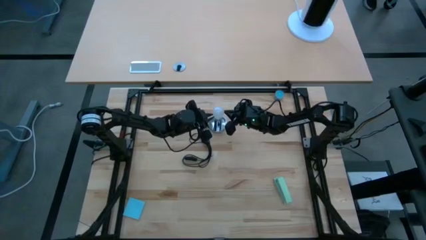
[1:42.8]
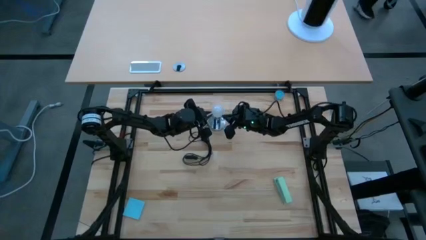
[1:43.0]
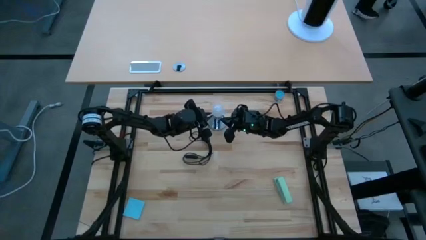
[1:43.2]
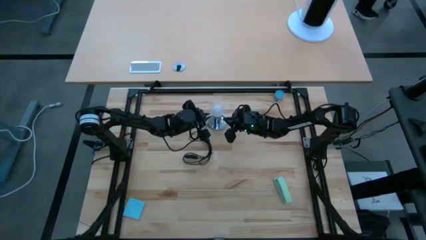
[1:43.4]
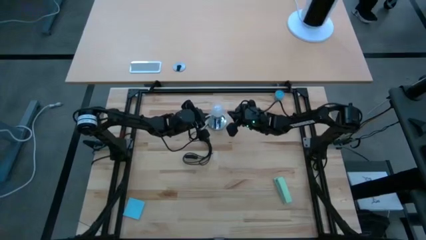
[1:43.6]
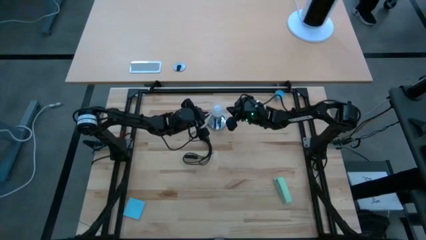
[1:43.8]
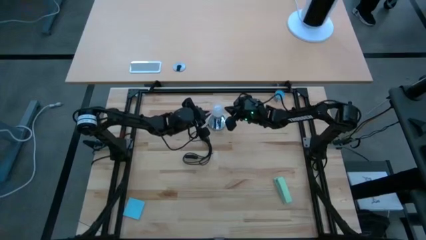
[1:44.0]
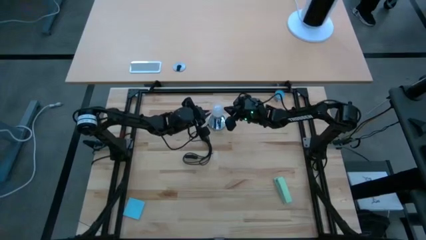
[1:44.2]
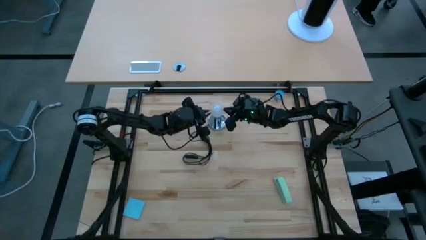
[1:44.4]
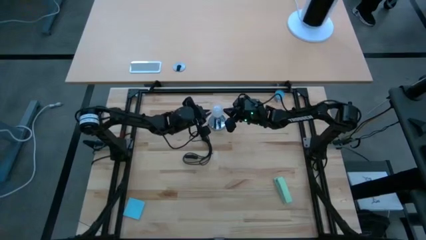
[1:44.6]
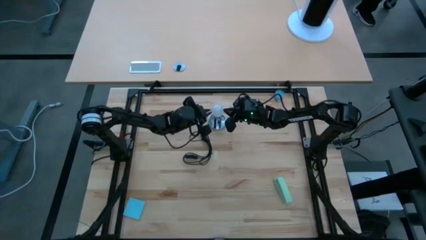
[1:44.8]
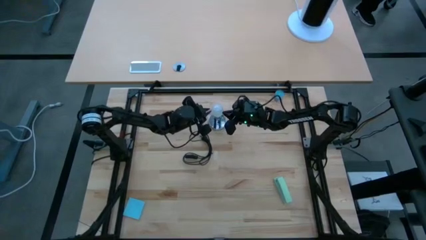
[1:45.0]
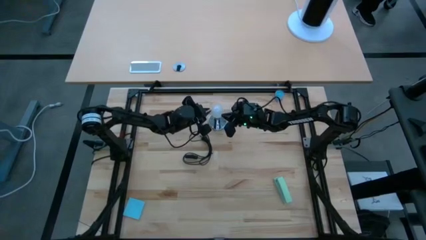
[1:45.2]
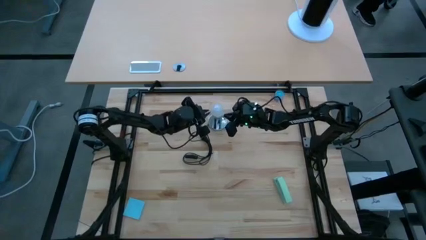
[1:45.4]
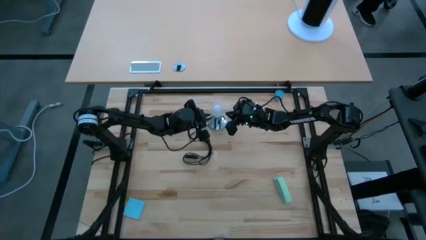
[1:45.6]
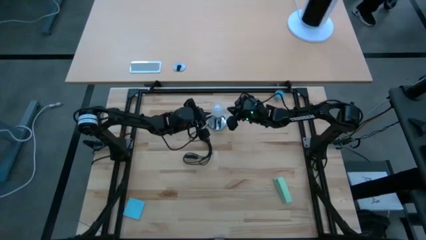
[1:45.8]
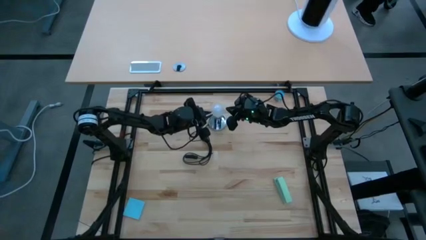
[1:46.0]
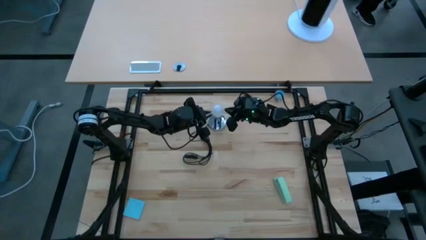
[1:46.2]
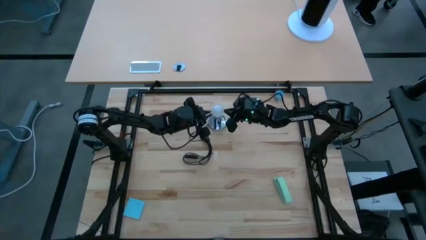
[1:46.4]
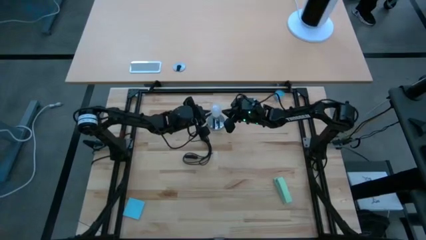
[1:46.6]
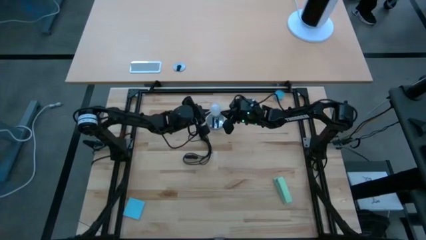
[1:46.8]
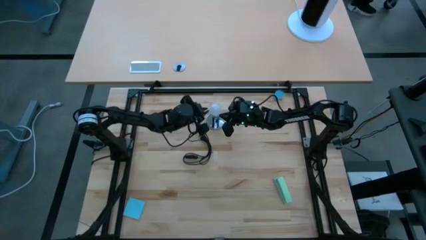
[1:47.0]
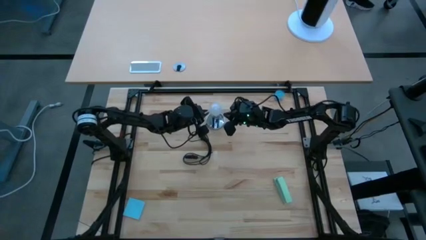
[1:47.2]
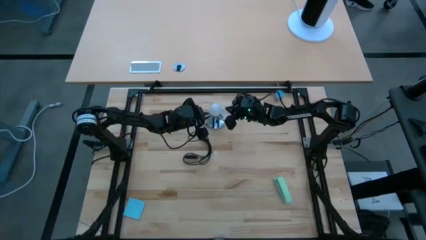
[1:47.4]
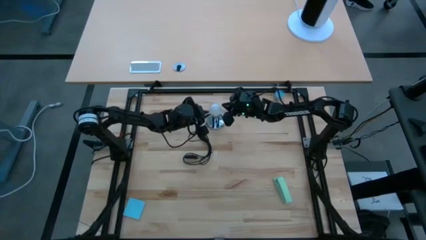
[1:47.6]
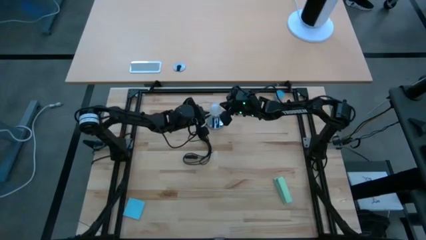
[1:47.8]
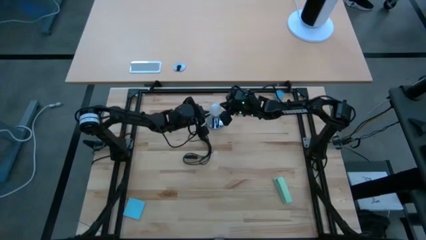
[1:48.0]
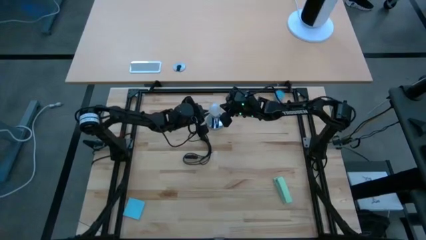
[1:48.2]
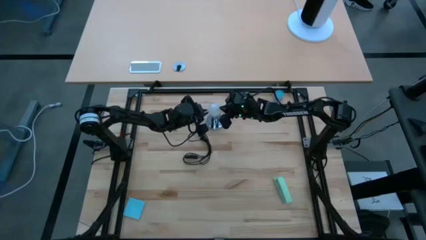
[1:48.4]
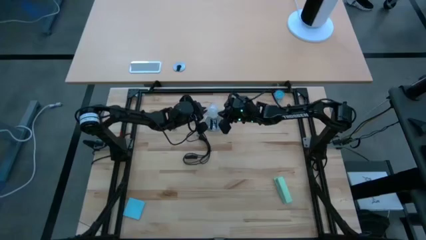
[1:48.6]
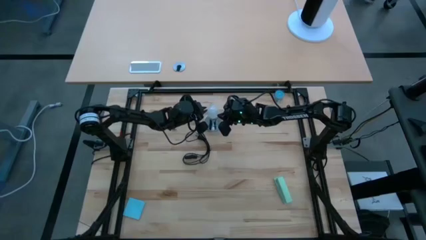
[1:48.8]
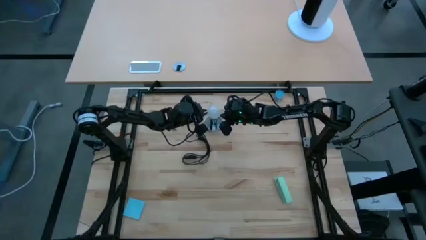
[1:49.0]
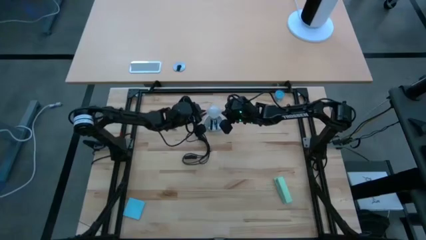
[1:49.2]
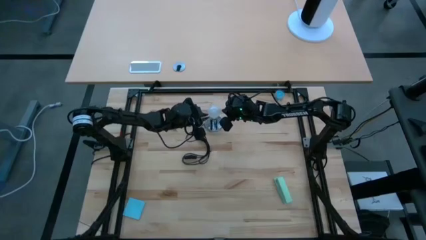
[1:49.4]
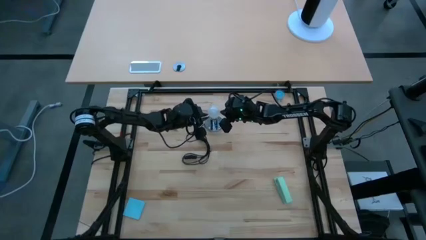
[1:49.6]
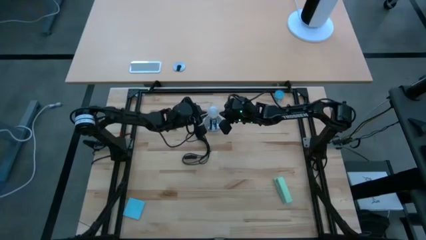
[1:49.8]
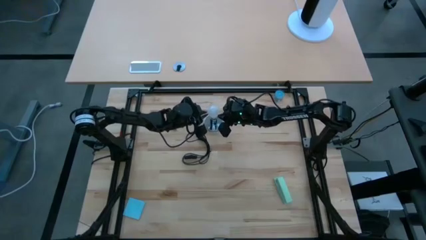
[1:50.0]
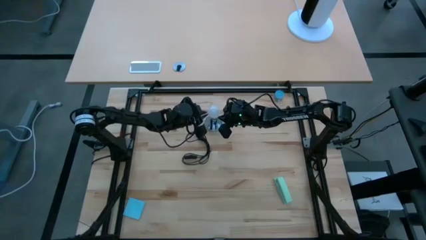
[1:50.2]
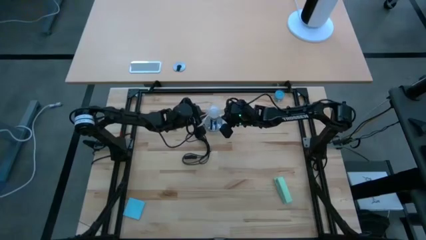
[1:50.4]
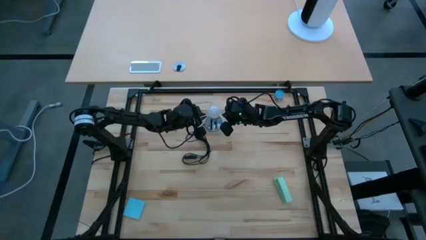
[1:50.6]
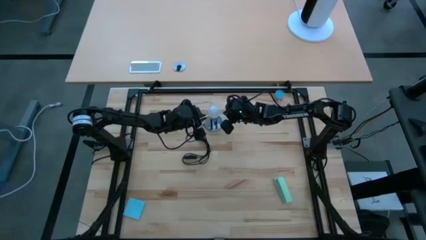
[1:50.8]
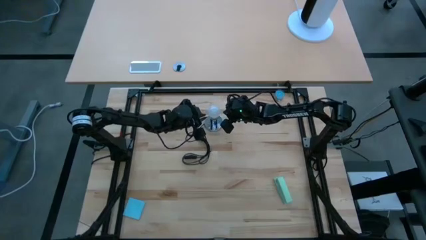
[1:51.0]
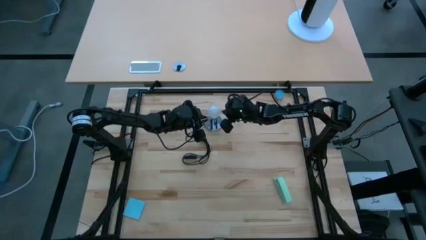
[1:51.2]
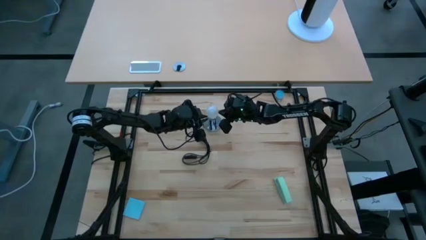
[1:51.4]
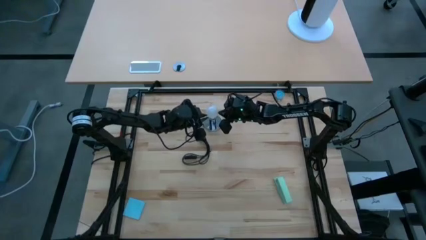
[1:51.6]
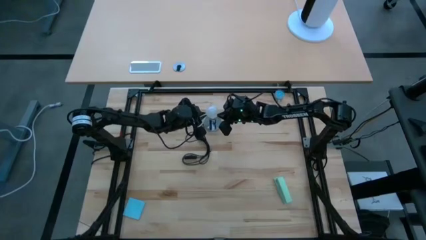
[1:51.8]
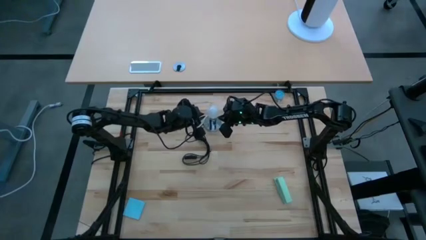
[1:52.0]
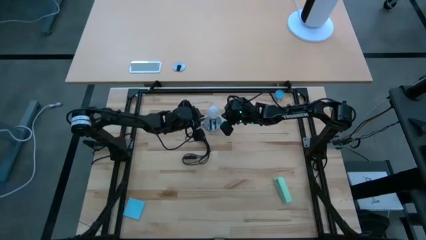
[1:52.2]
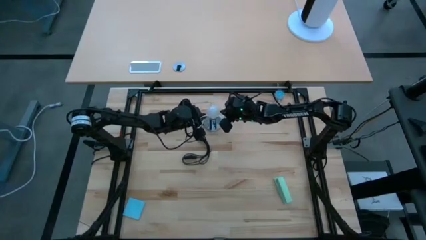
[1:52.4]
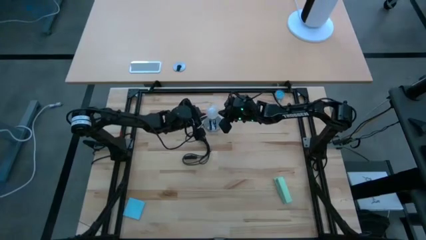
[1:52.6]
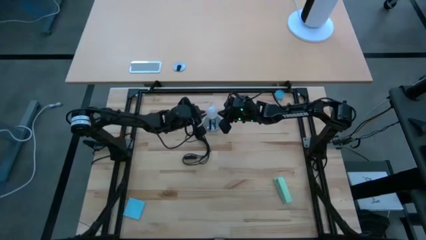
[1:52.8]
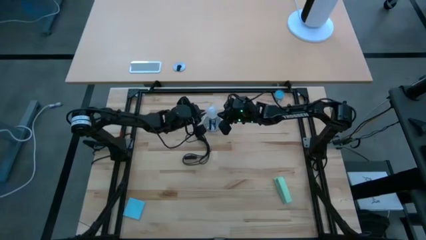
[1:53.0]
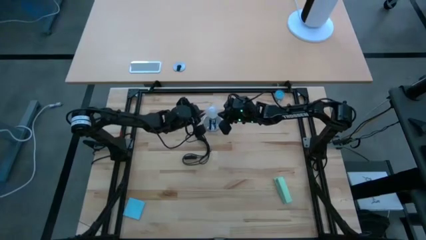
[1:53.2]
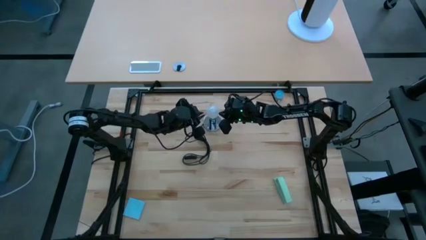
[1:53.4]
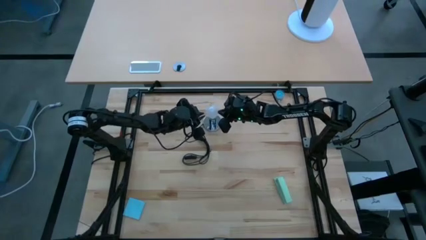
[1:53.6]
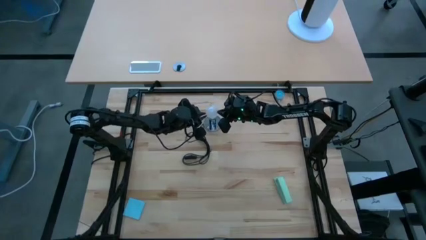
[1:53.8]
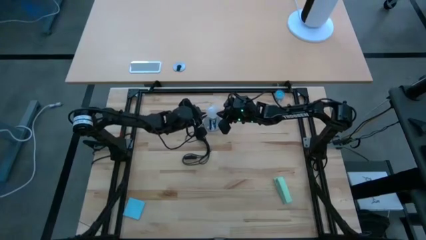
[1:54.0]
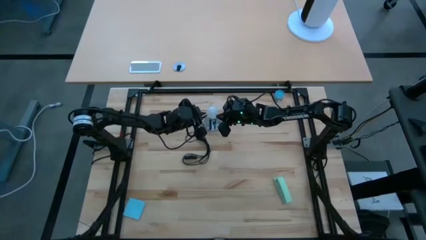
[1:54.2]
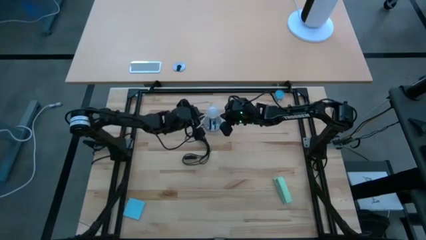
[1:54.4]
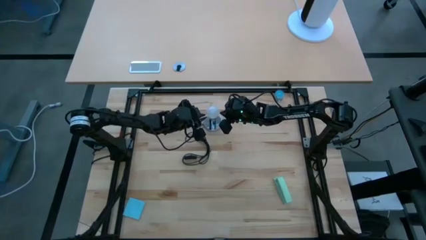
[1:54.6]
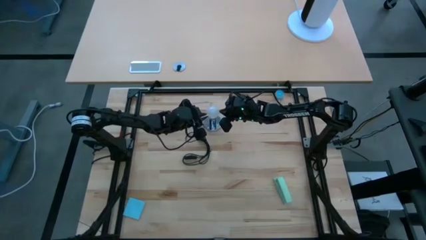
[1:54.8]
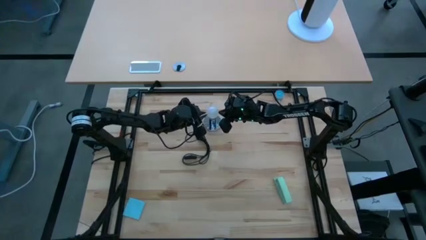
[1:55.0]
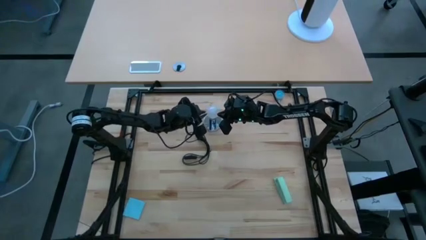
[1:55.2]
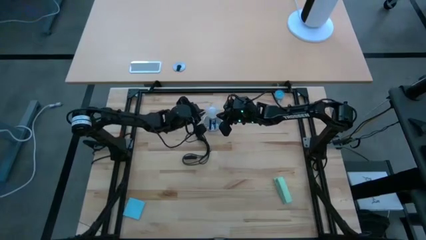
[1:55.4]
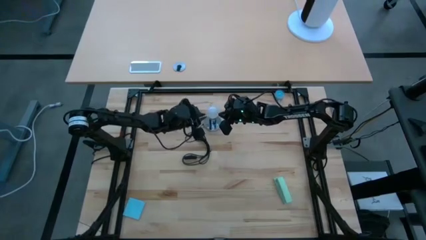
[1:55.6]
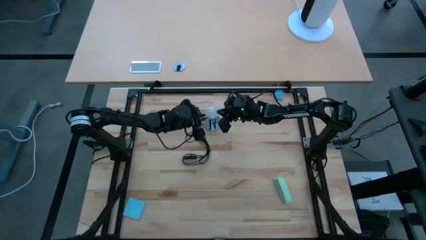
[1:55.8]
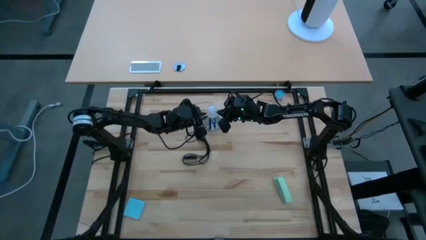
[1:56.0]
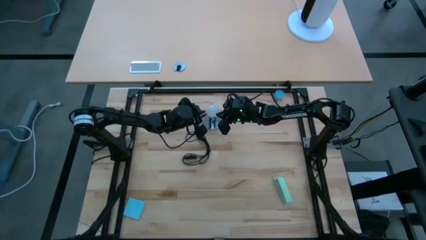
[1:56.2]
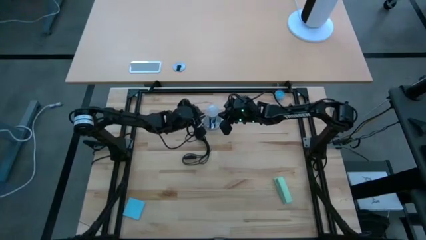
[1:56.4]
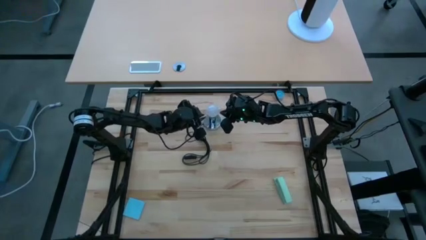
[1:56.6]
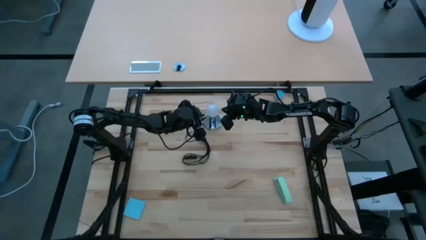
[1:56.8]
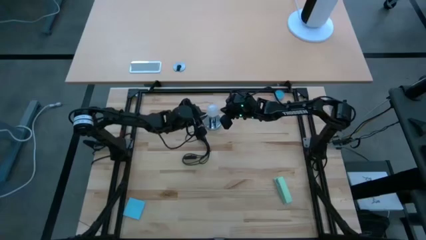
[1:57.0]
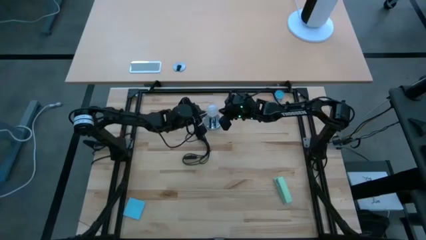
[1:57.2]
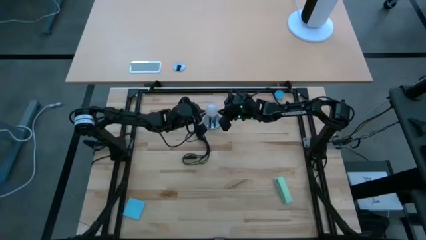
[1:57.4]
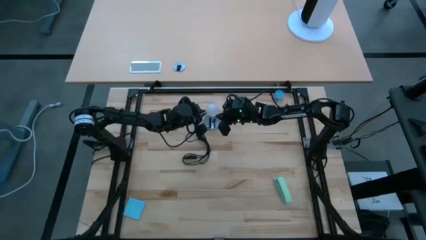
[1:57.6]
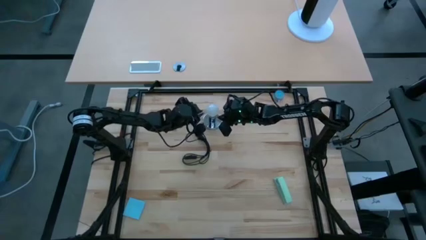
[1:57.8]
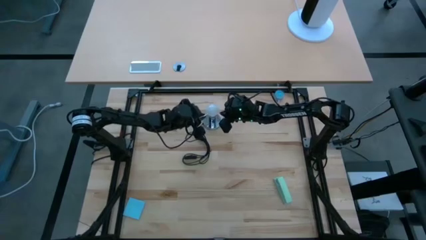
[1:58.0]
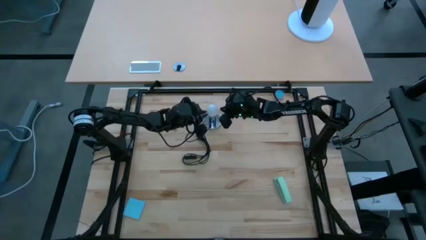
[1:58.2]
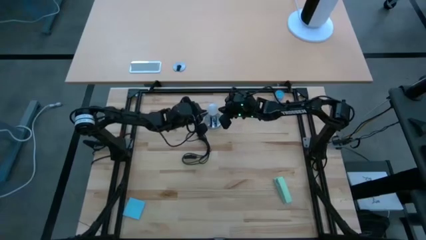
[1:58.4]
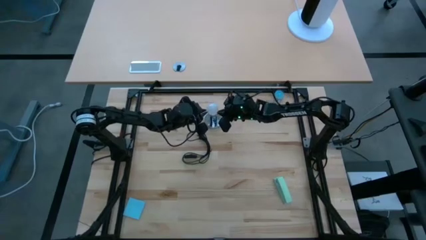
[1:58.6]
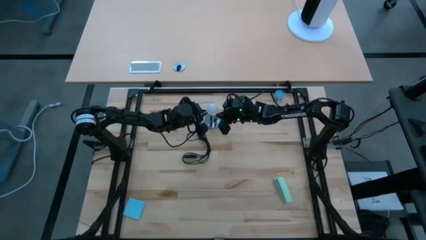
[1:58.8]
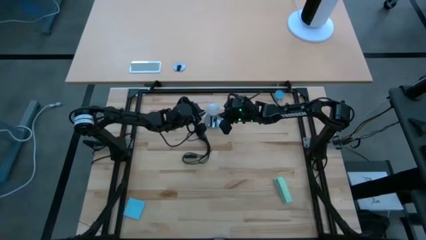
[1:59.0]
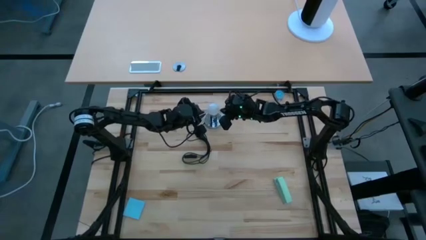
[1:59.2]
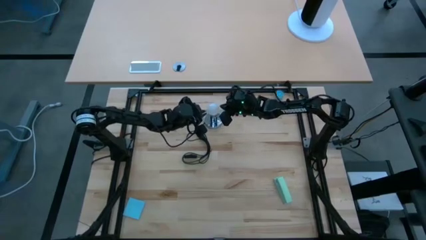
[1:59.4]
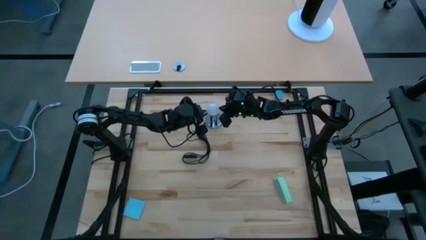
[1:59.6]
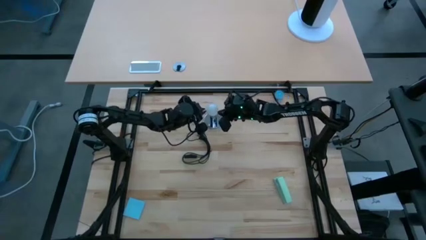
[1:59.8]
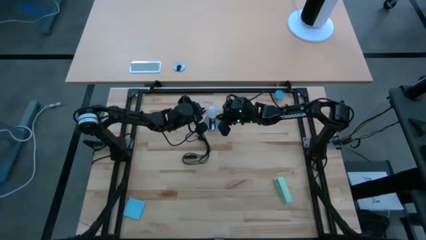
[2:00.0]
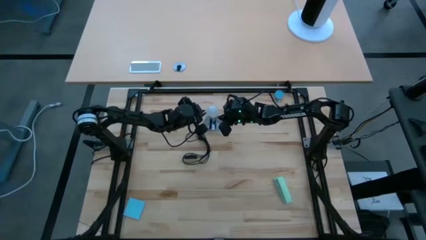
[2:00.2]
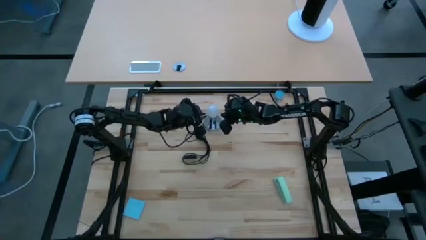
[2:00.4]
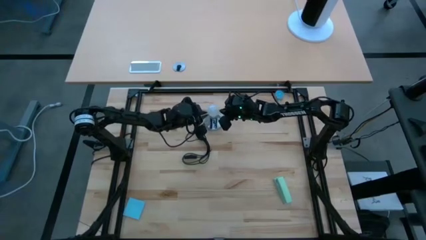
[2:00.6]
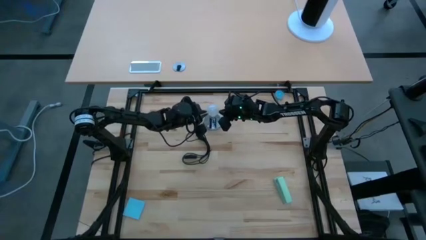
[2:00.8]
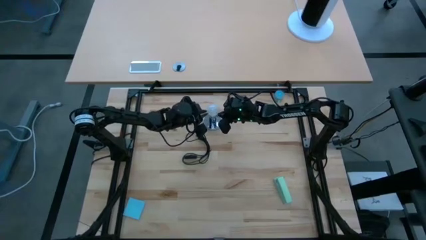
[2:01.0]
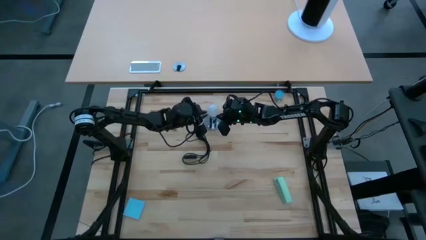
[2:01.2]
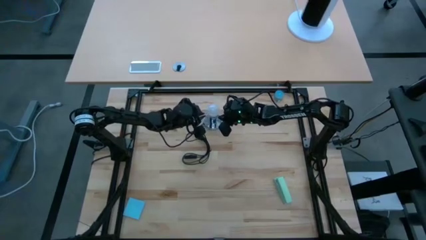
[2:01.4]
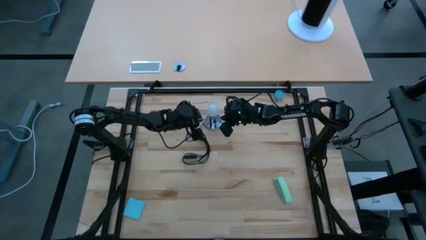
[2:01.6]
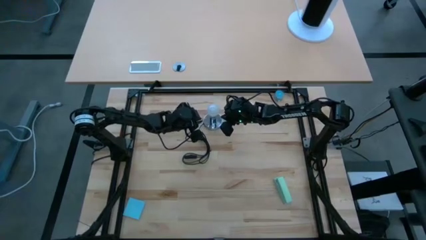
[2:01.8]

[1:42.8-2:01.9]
Task: Screw lightbulb
Insert the lightbulb into the lamp
